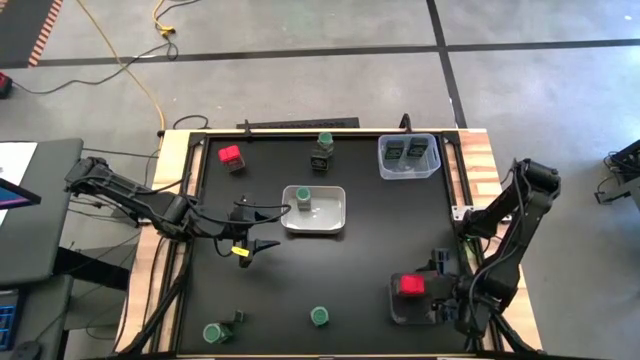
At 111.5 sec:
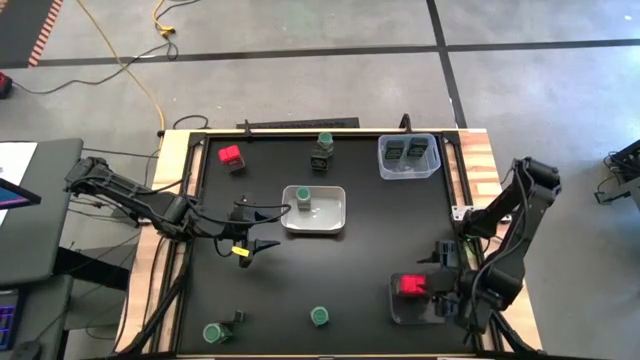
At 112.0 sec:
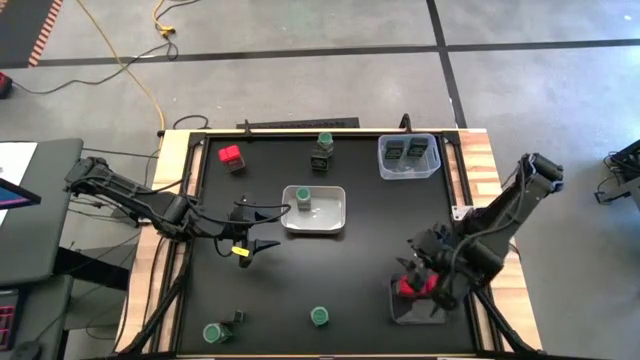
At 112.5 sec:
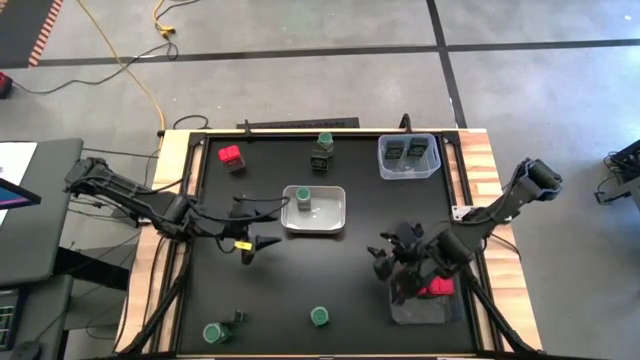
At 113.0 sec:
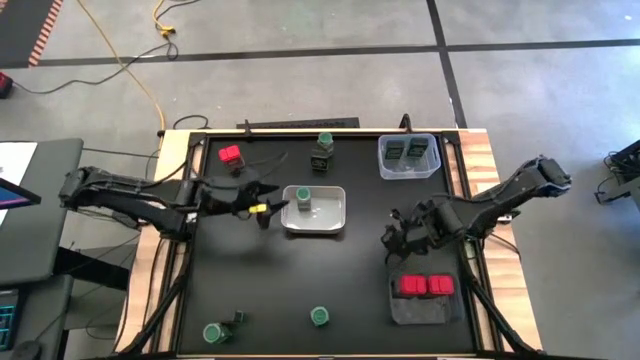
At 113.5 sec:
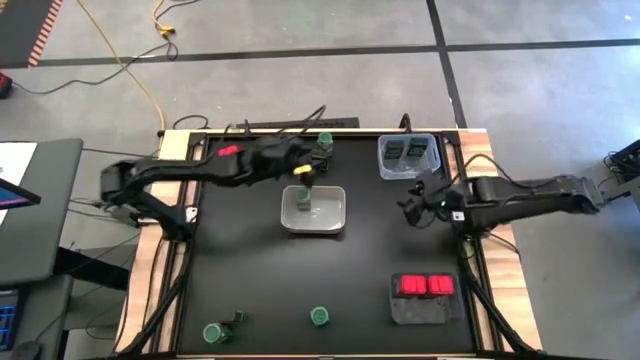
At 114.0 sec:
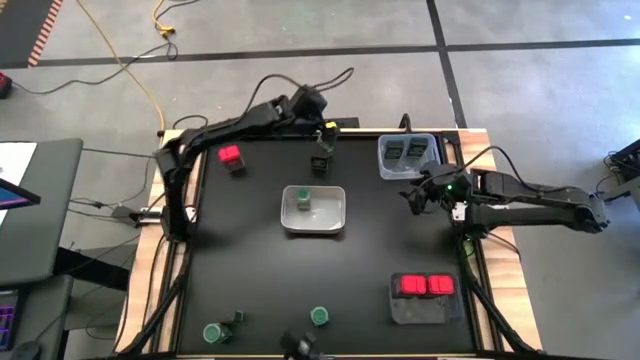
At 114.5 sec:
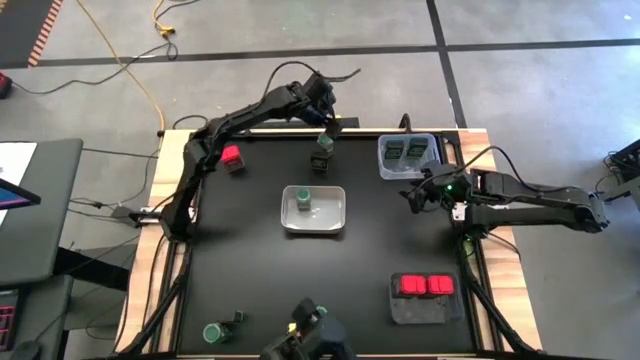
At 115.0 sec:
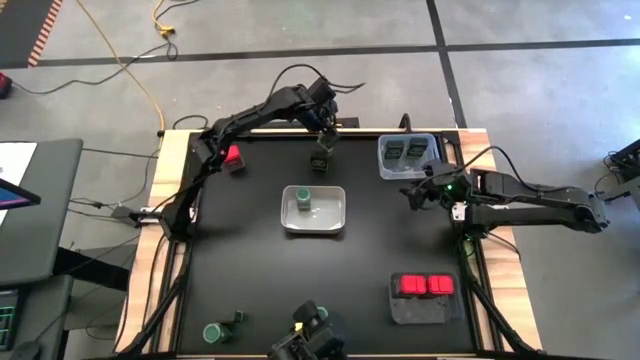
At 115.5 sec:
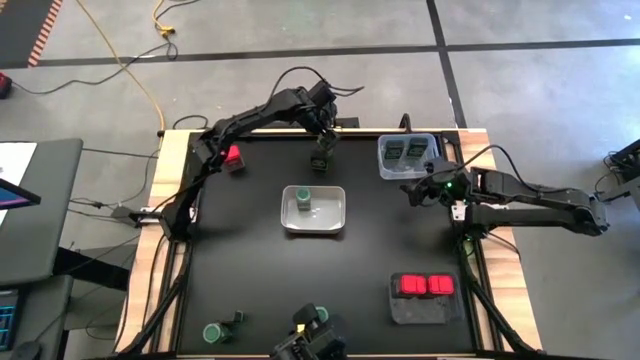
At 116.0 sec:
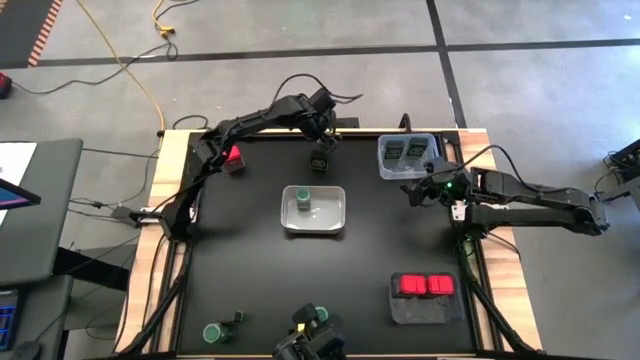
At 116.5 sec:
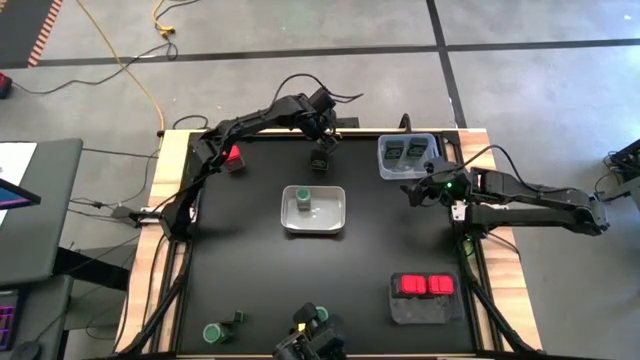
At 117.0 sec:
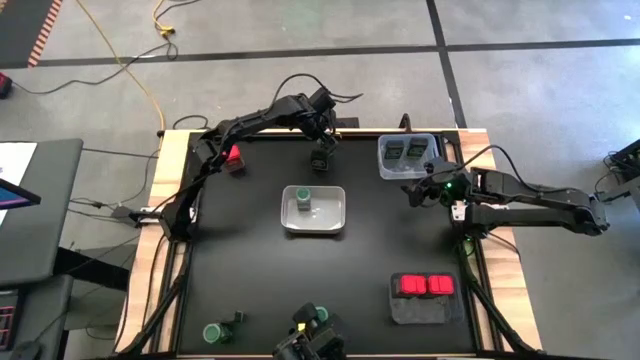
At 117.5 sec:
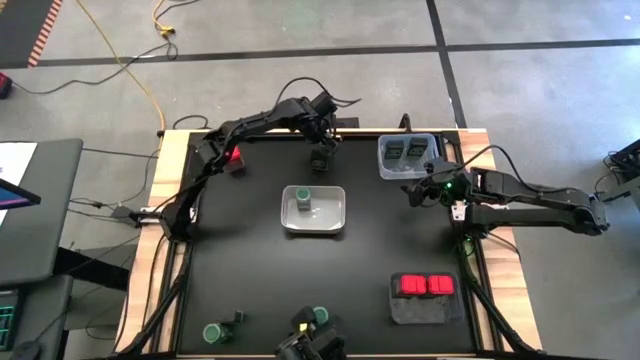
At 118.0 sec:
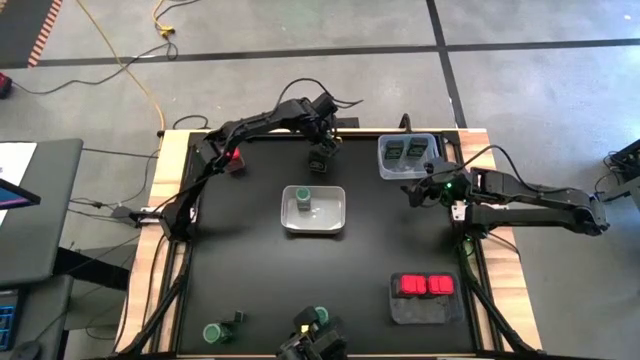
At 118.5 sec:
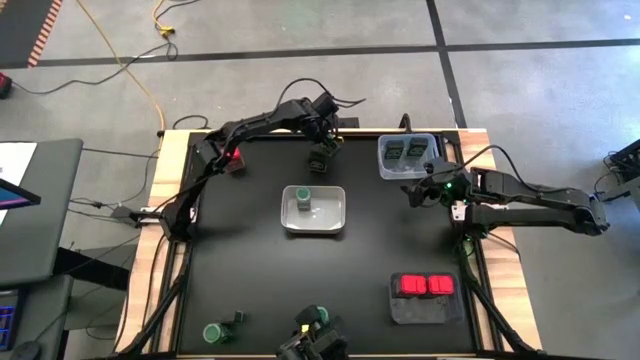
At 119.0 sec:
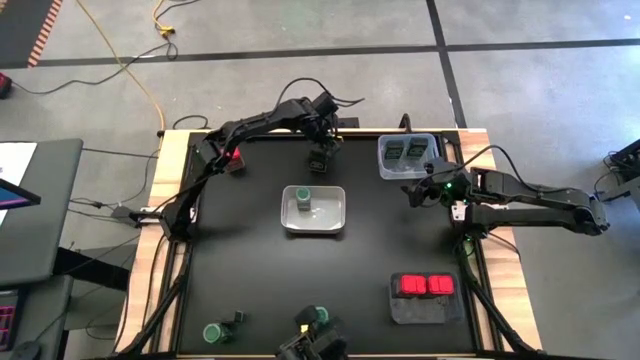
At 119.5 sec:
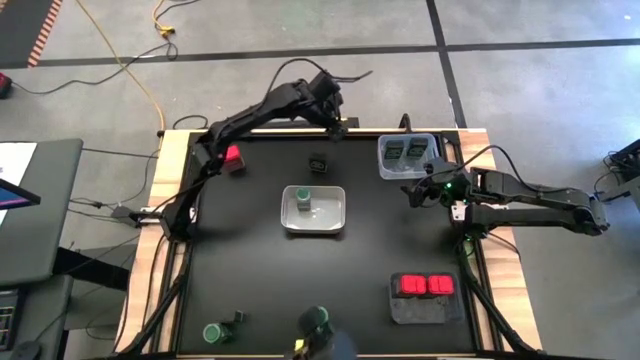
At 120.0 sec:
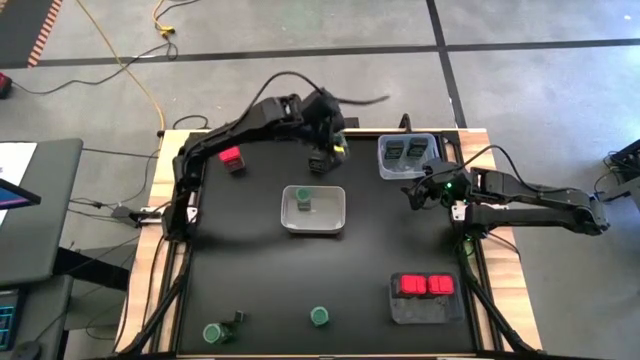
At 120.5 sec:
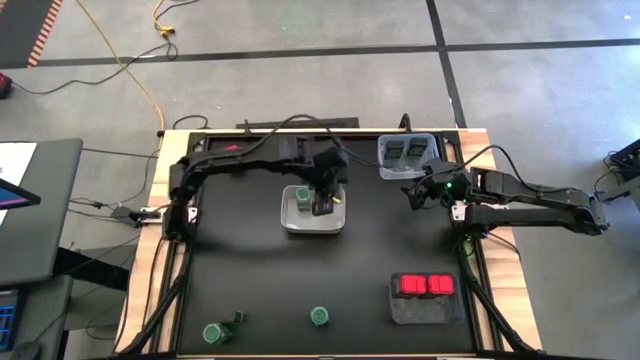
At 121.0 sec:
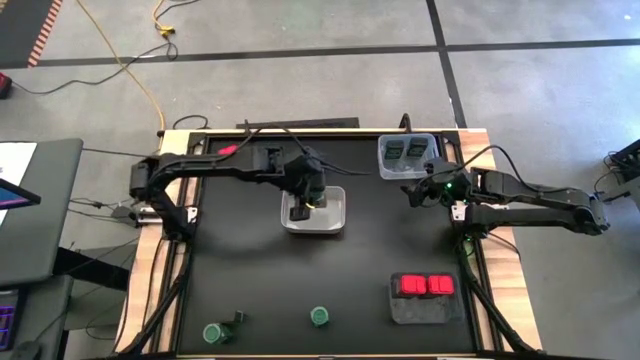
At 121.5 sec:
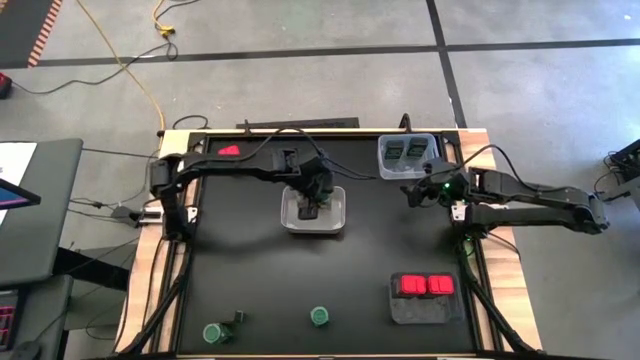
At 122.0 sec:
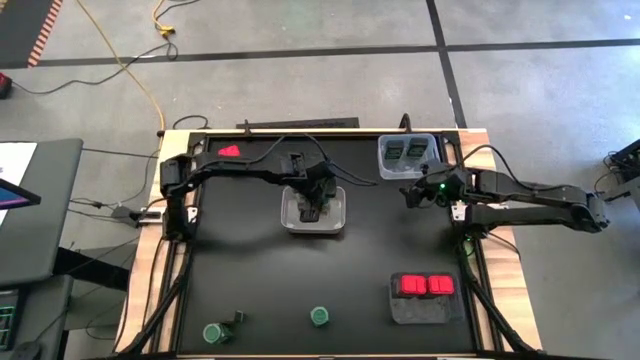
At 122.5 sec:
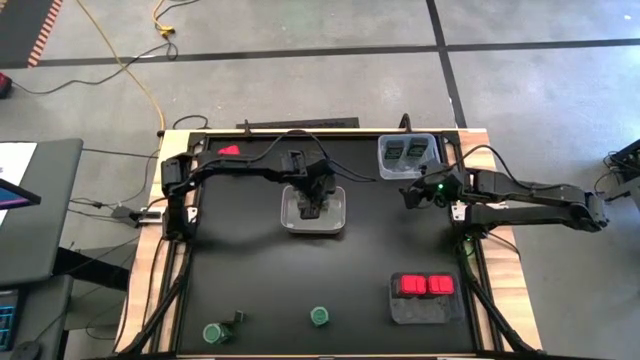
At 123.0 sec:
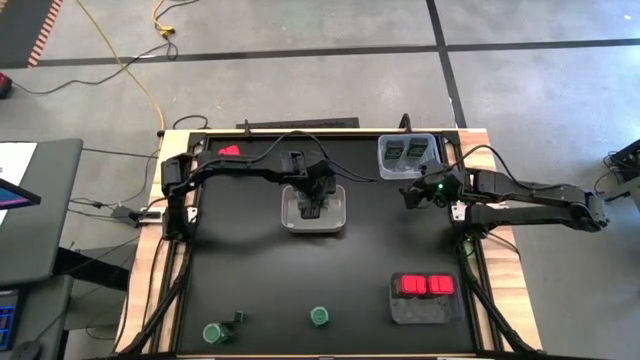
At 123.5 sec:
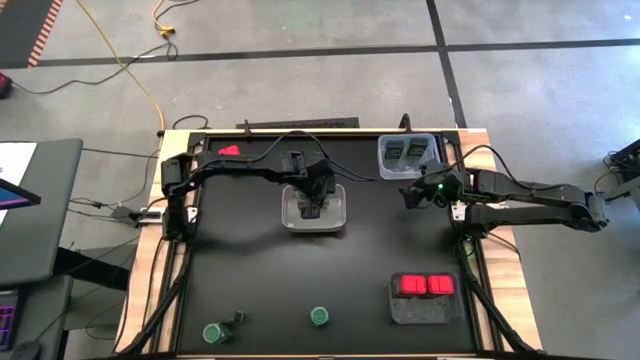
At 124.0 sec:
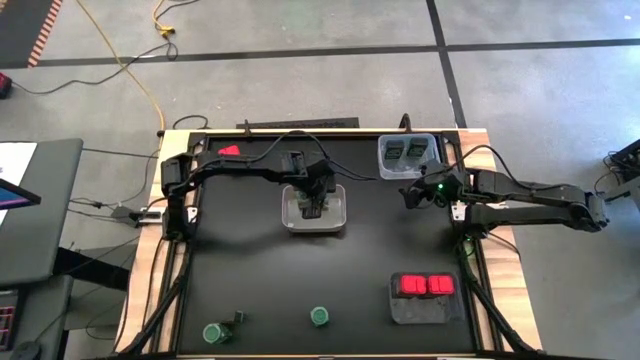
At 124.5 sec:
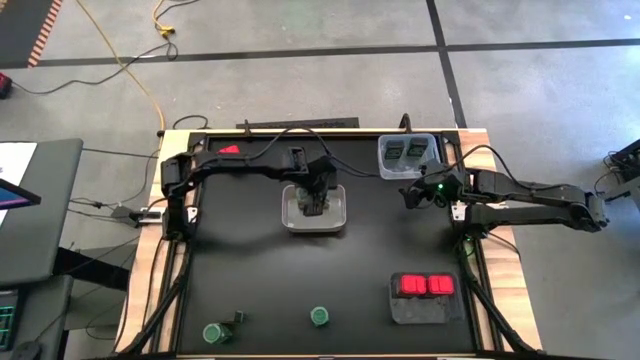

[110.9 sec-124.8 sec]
Task: Sort spices by type
Put the top green seasoning bottle into the white bin

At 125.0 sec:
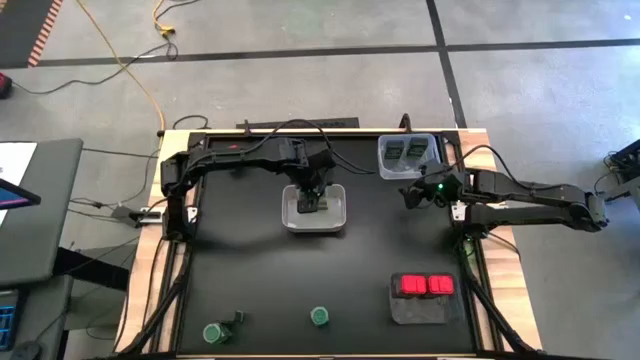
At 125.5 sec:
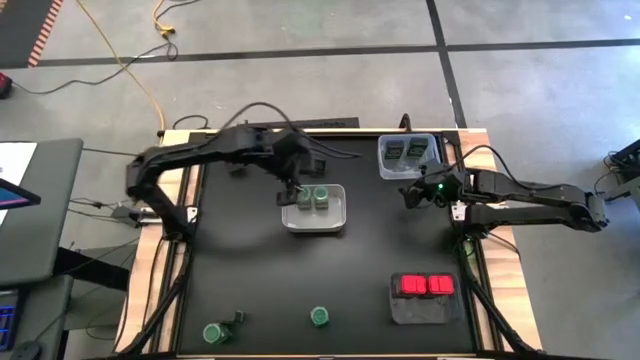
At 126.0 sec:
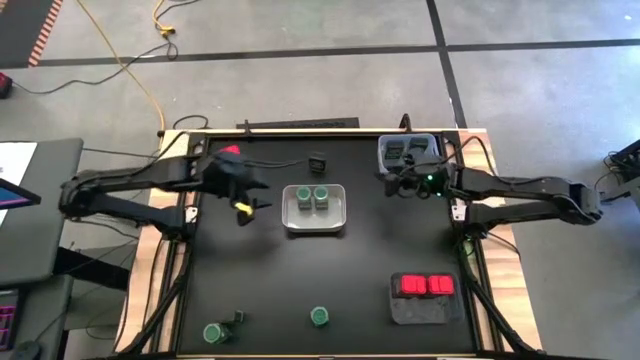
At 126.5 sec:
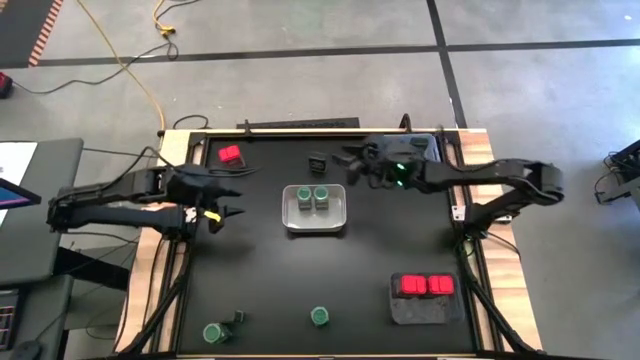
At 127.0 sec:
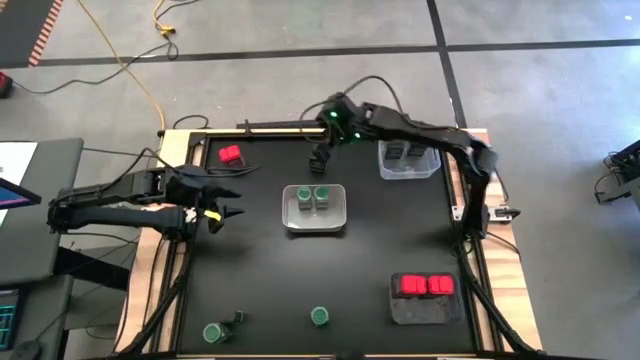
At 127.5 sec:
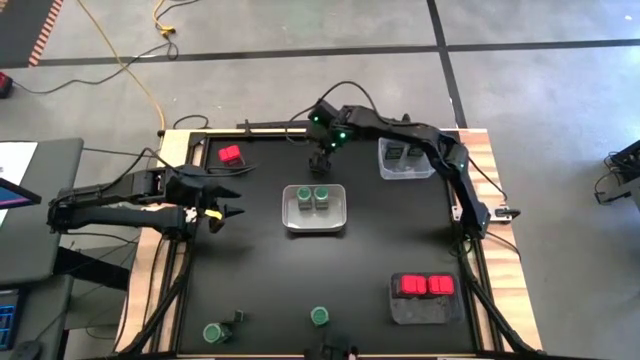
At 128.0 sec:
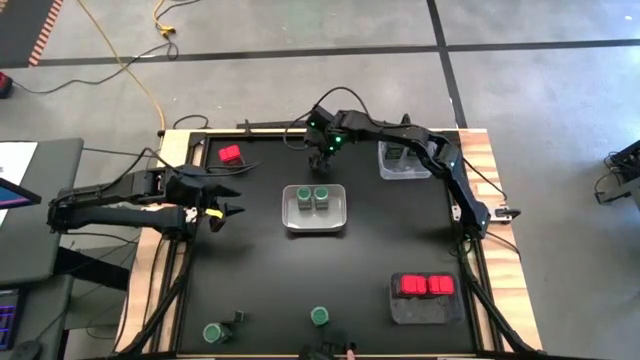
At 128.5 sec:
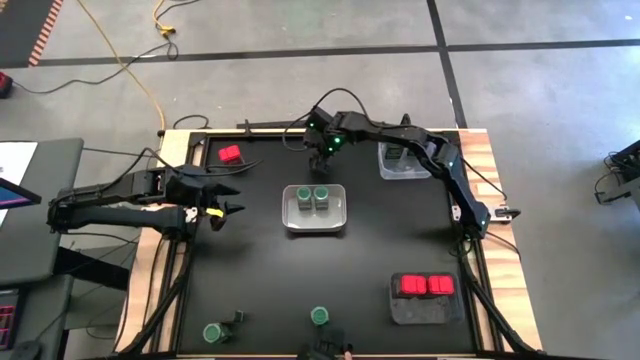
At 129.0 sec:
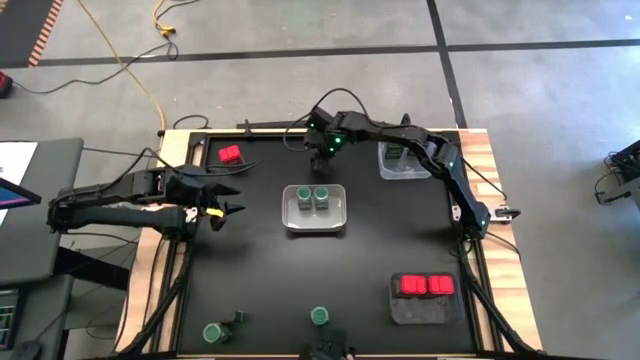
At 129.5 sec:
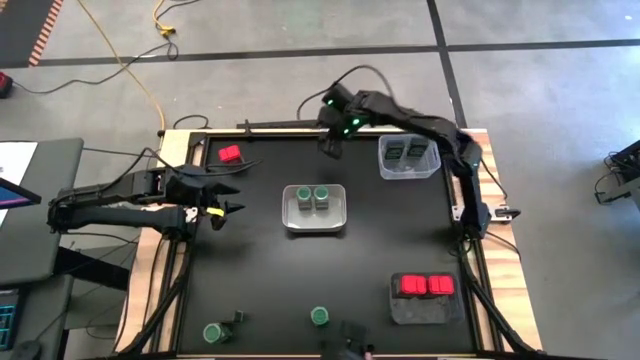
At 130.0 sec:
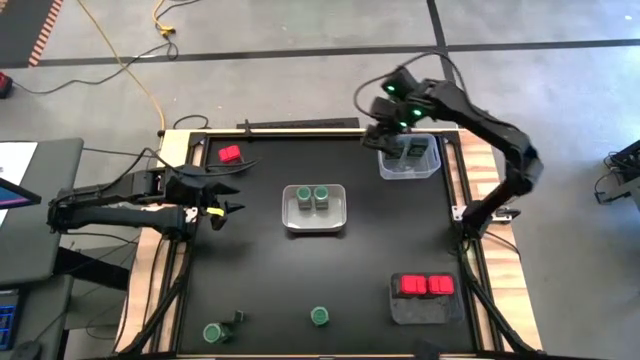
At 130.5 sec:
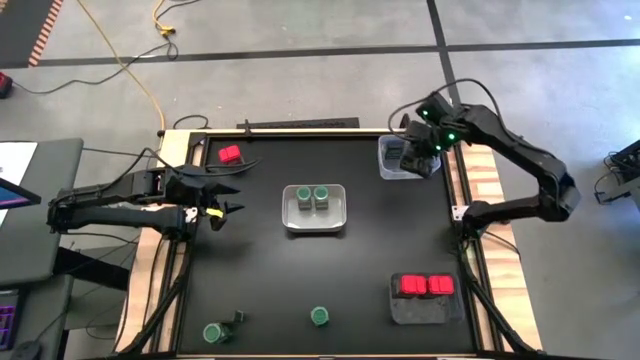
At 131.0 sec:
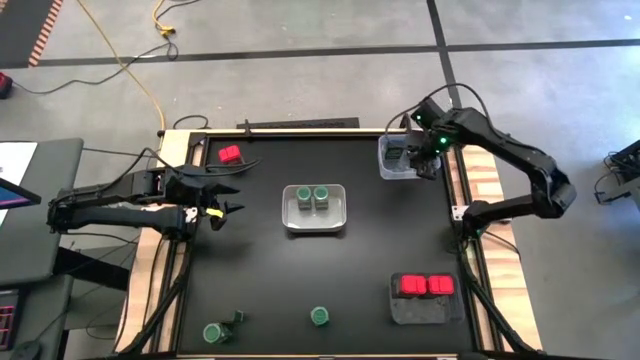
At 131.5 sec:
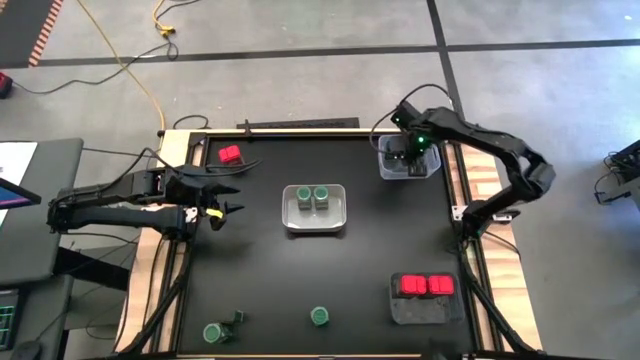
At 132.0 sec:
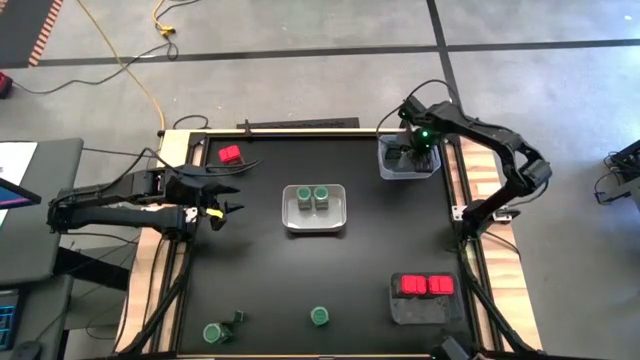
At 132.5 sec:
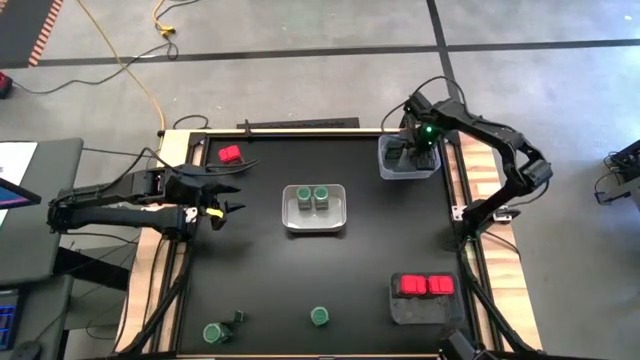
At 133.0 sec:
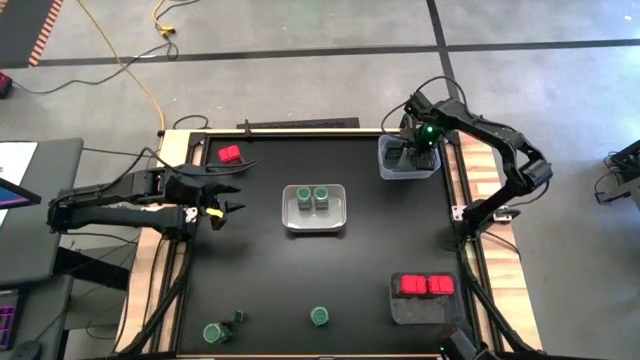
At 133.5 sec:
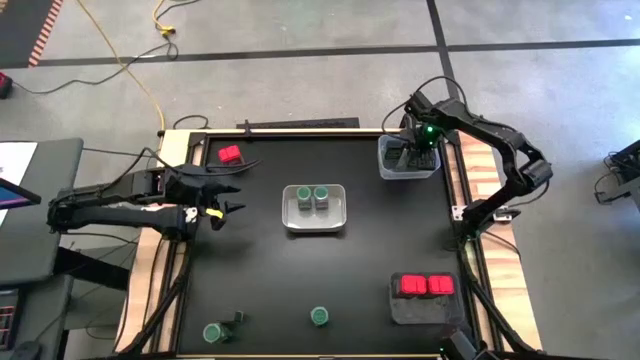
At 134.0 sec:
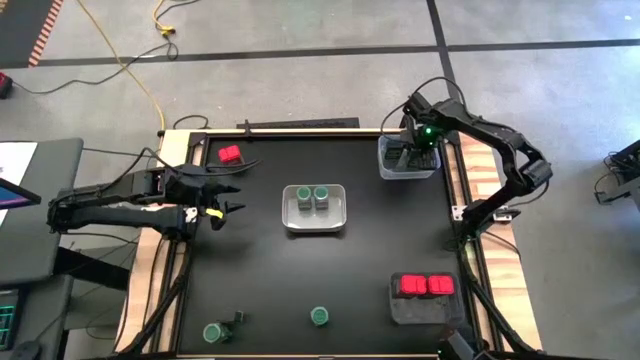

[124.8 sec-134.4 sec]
Put the top black seasoning can into the transparent bin
